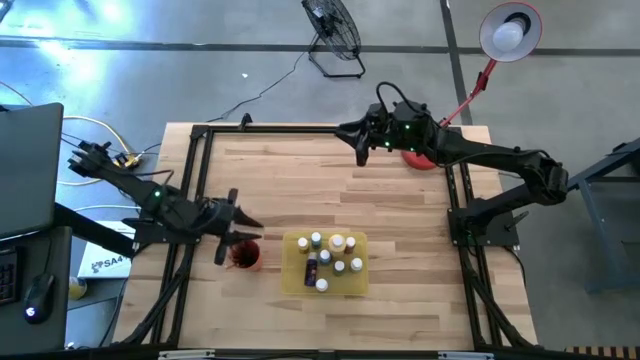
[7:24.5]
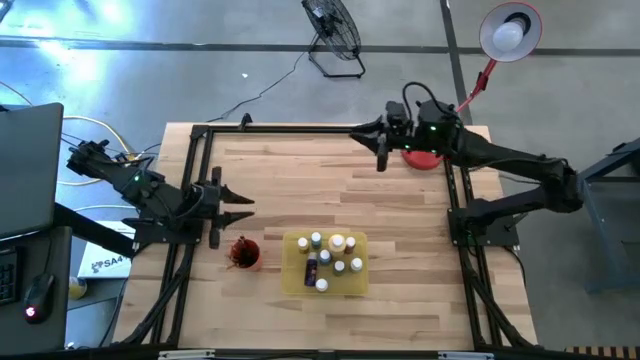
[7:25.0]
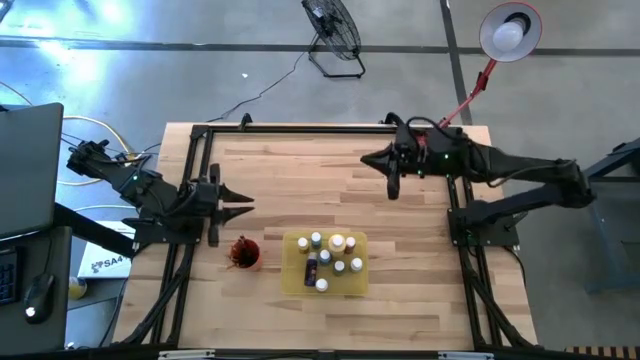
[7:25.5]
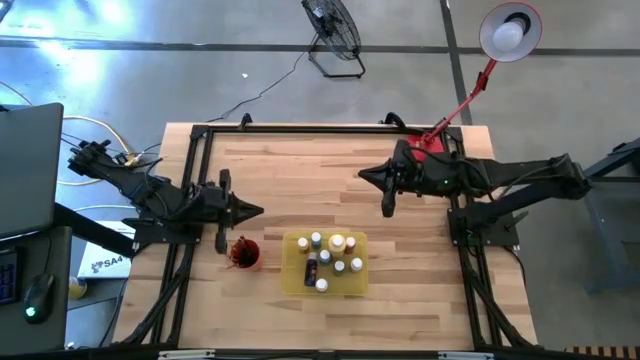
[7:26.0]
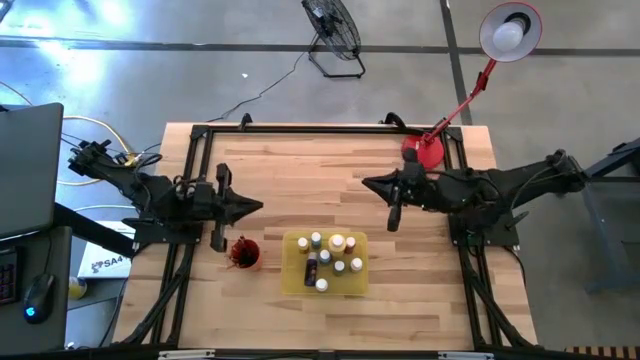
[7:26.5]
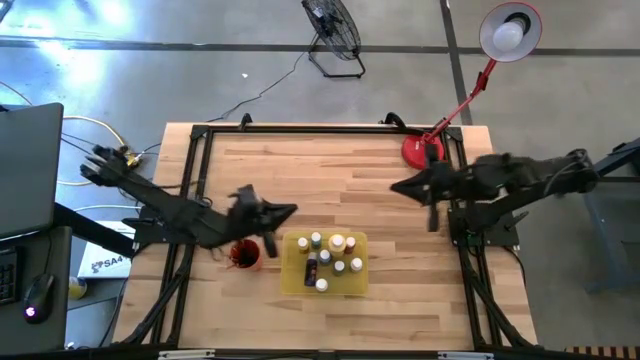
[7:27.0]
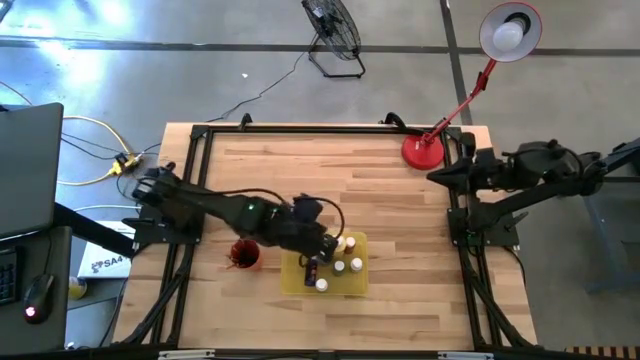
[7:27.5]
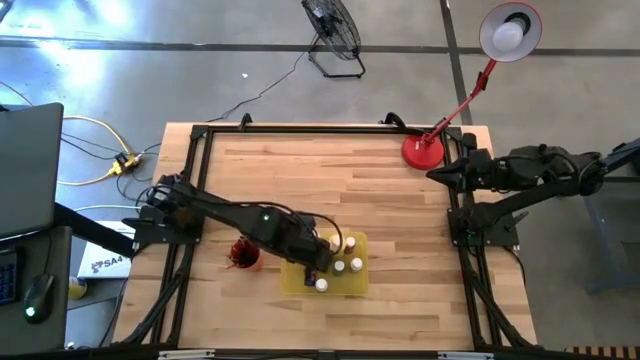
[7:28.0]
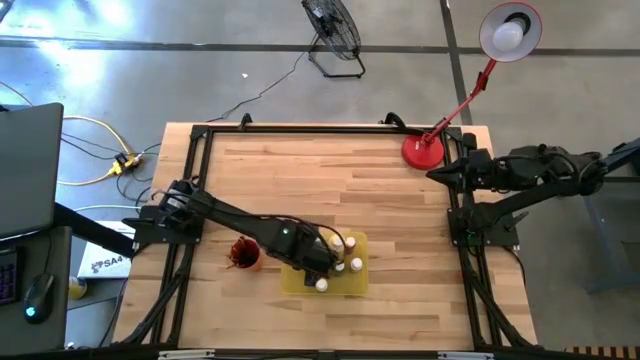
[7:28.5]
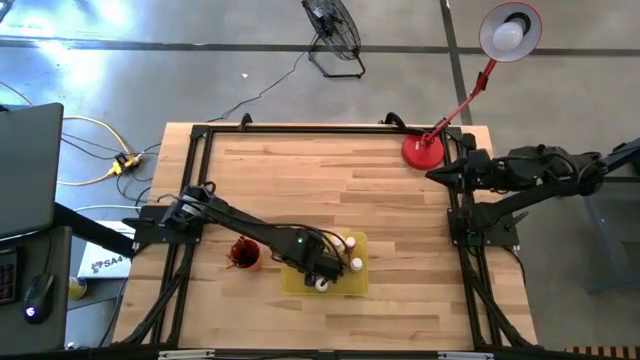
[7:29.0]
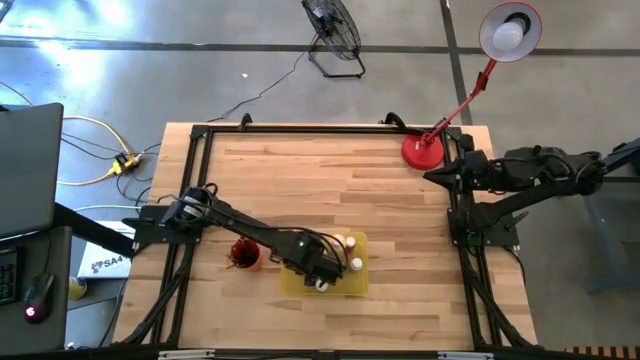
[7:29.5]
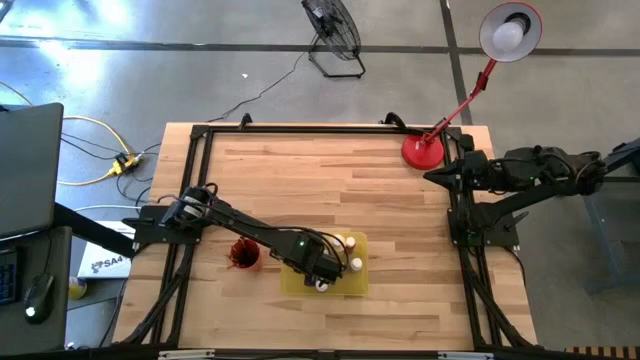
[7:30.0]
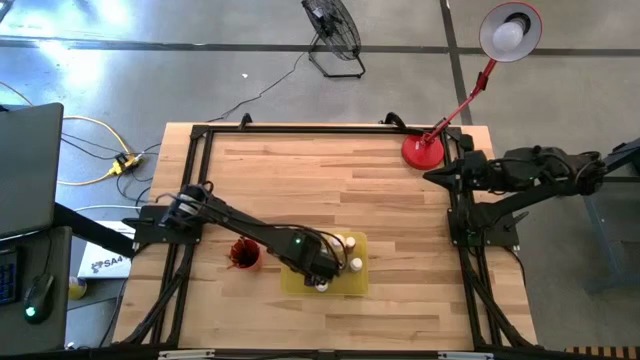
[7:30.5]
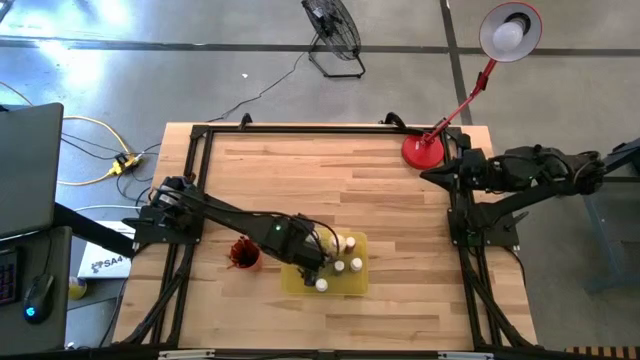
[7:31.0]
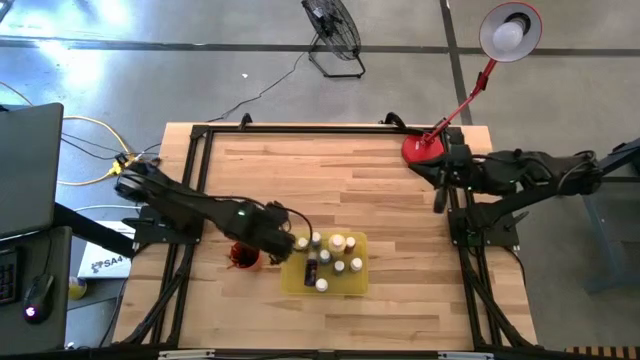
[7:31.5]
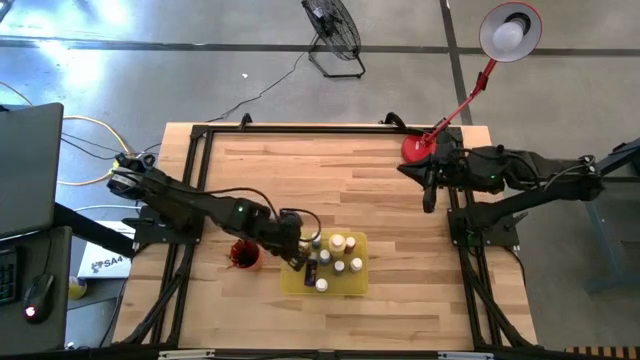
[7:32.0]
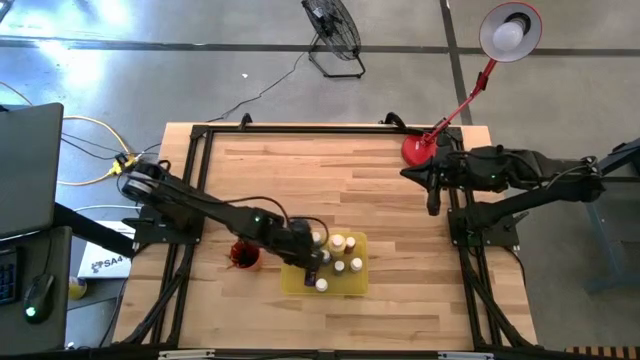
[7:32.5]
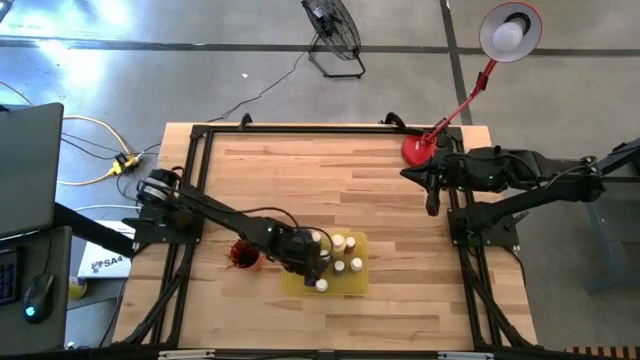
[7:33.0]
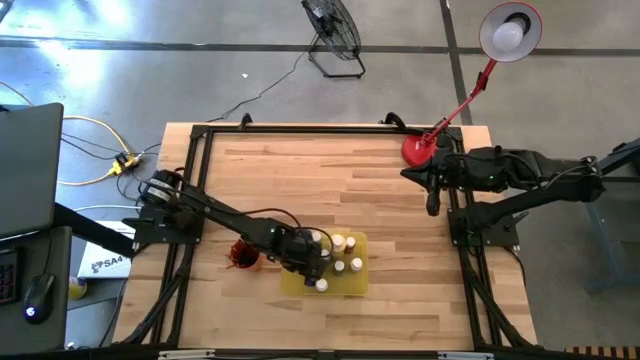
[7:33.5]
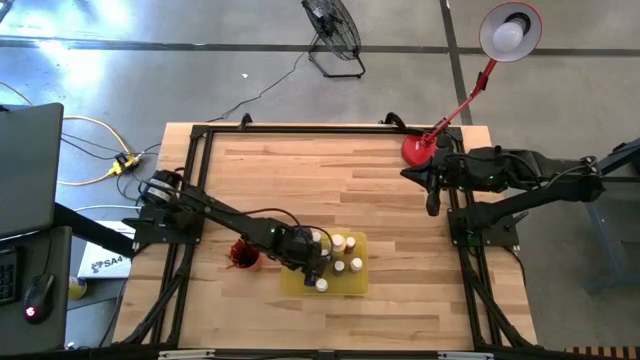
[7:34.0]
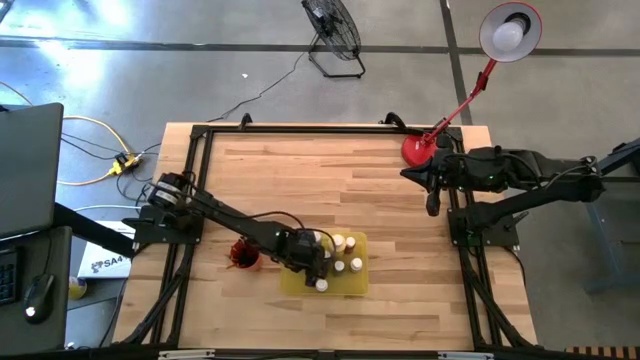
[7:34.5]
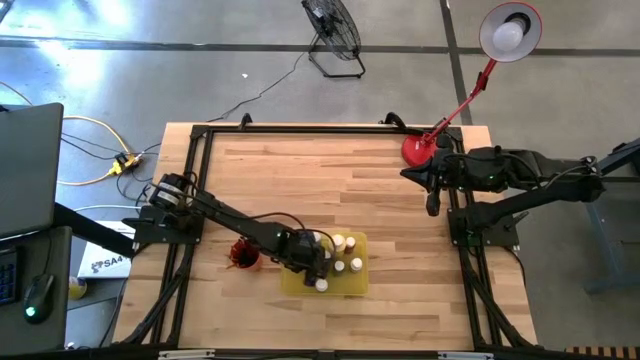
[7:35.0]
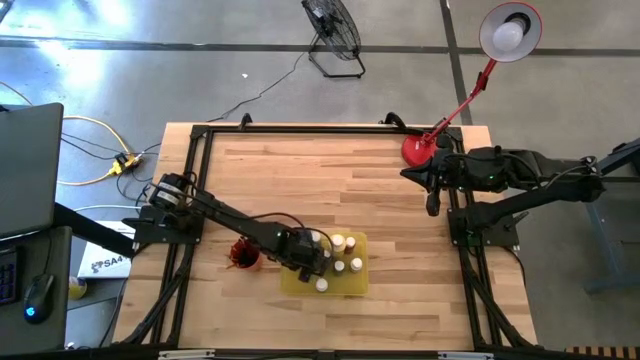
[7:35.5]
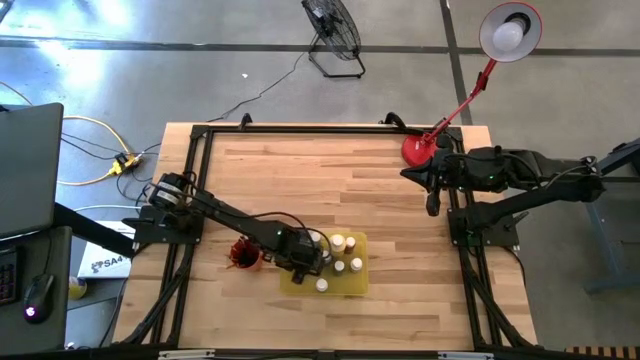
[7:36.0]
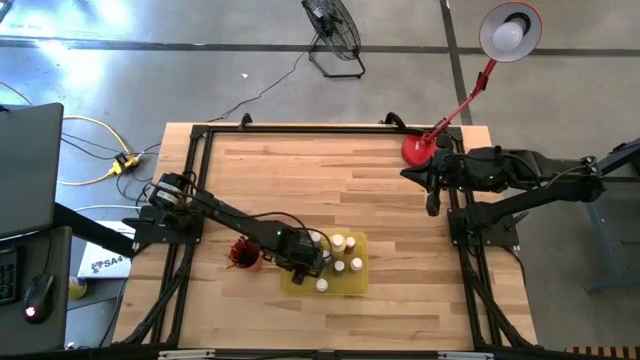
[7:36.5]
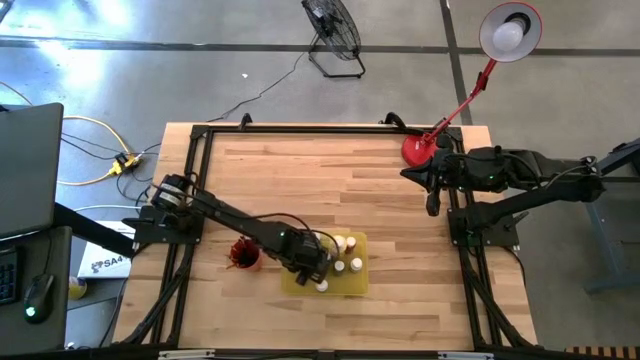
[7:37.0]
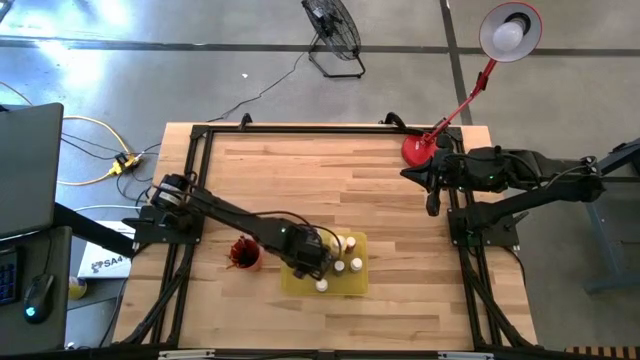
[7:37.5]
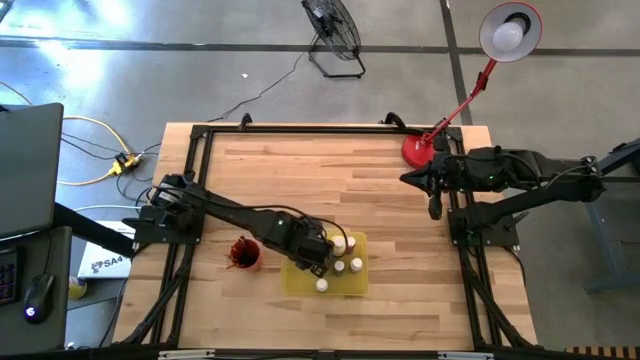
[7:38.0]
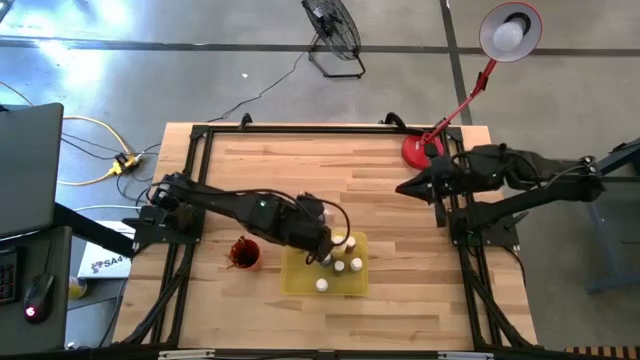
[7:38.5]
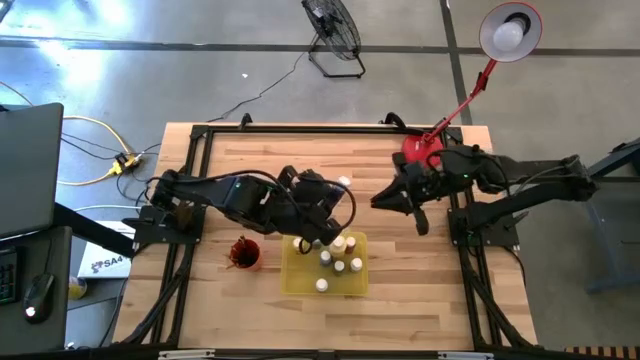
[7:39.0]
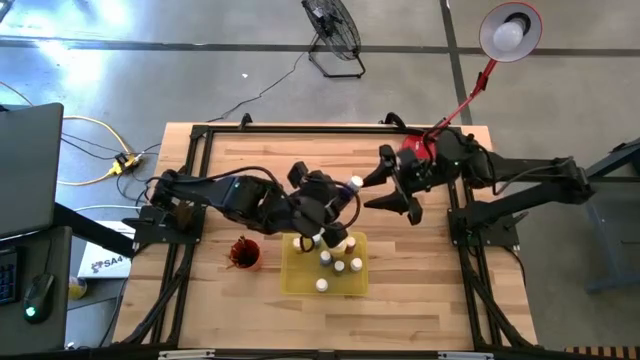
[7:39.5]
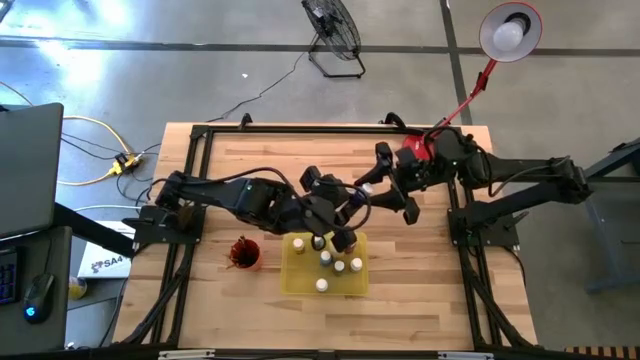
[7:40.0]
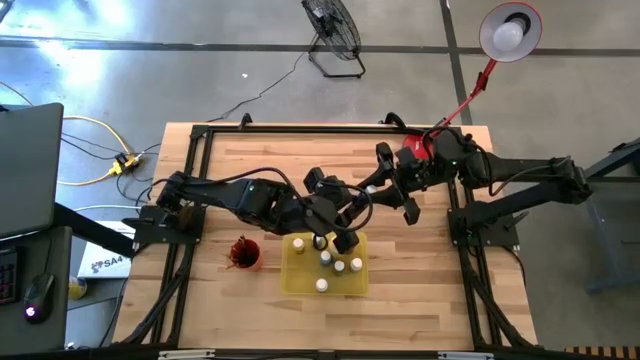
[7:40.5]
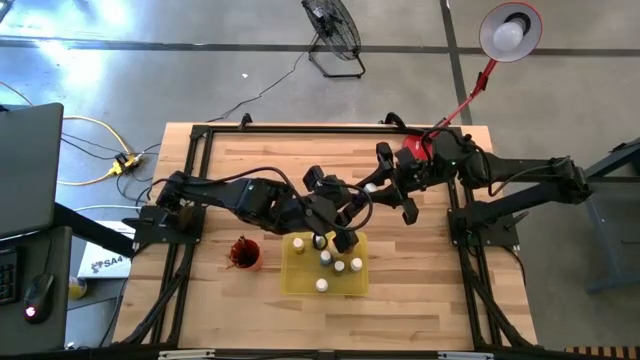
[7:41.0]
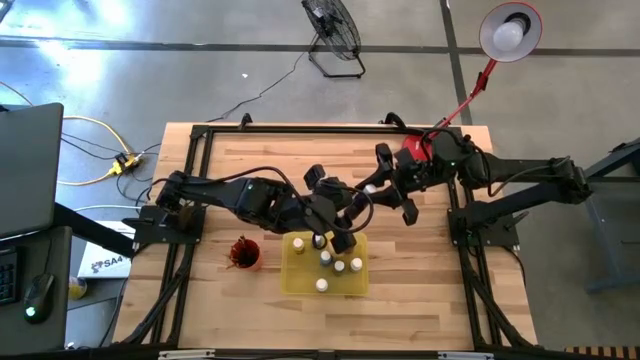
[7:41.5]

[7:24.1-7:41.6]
Task: Pick & Place Paint Supplies
Return to Home Position
